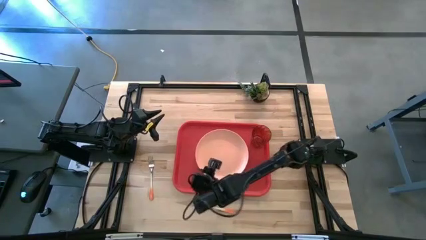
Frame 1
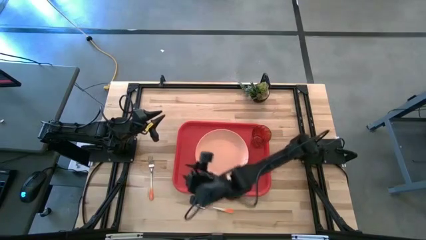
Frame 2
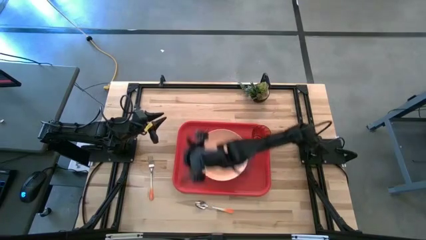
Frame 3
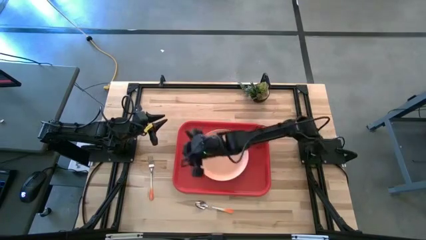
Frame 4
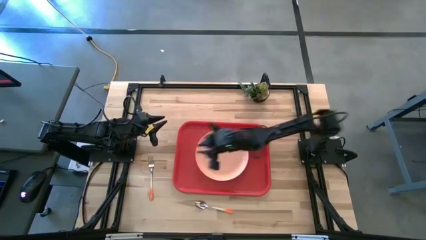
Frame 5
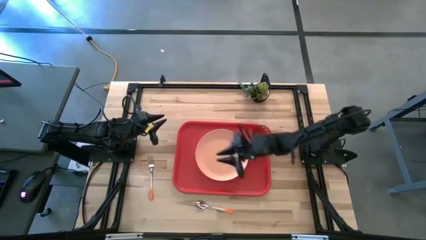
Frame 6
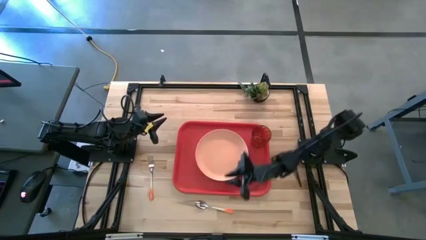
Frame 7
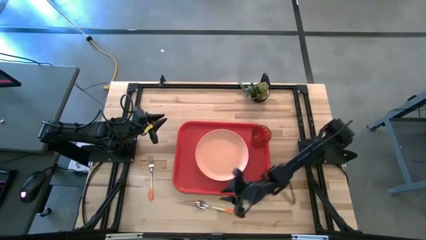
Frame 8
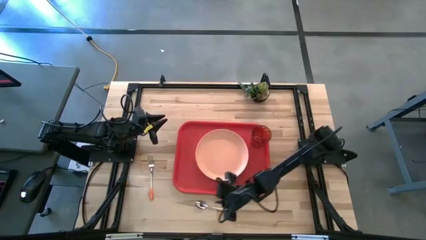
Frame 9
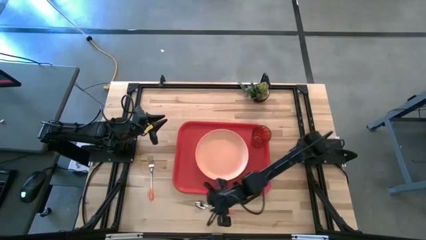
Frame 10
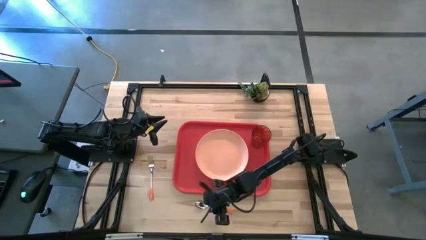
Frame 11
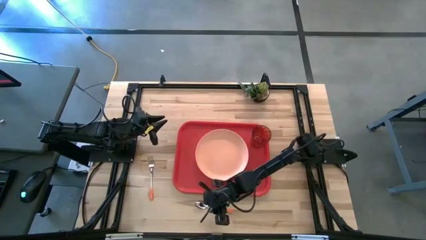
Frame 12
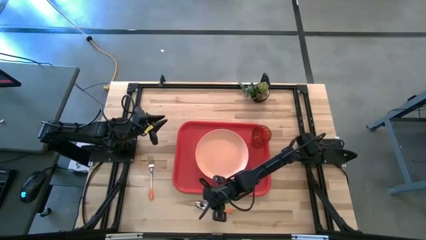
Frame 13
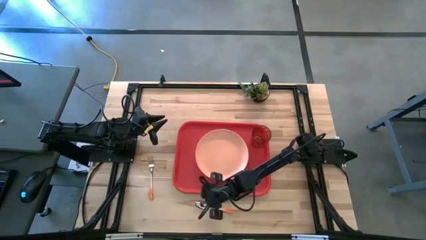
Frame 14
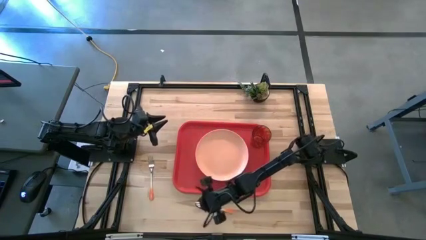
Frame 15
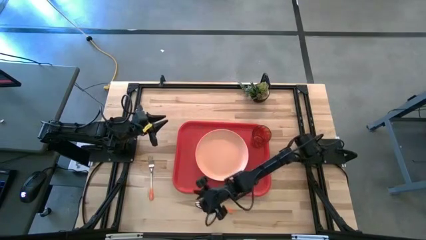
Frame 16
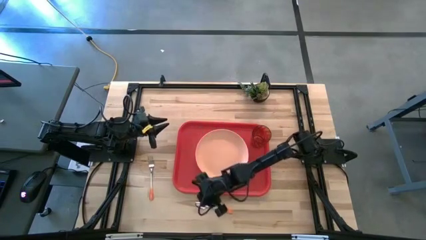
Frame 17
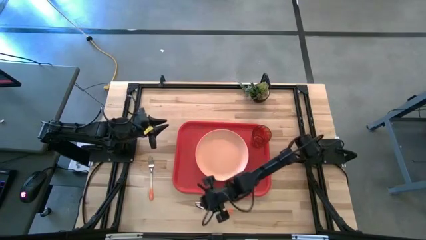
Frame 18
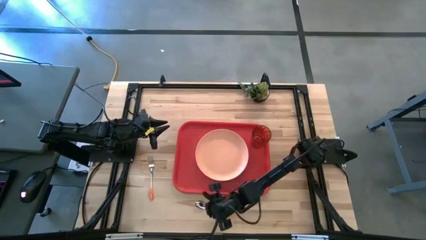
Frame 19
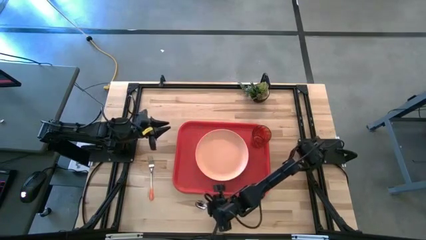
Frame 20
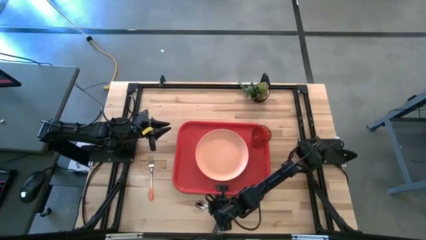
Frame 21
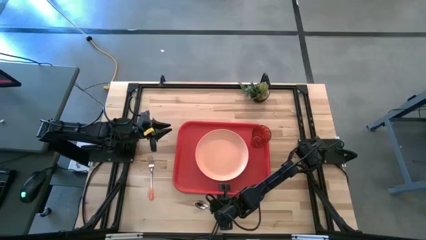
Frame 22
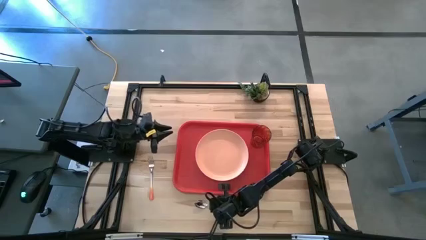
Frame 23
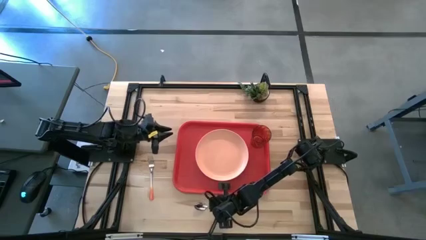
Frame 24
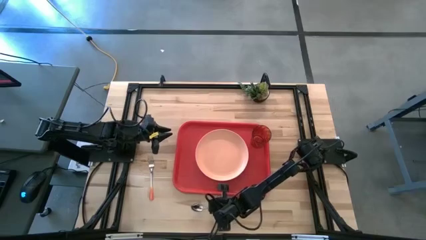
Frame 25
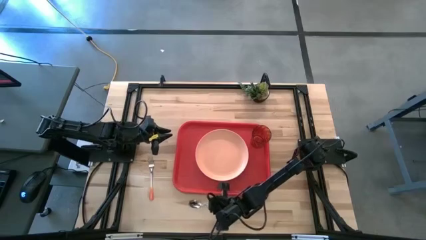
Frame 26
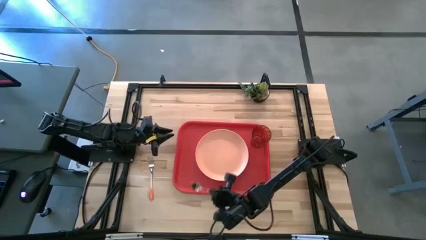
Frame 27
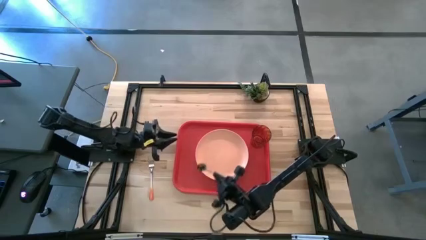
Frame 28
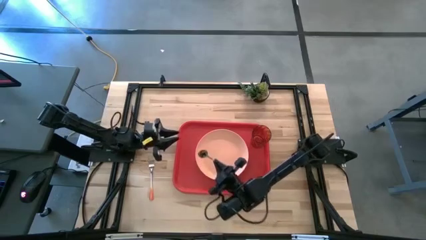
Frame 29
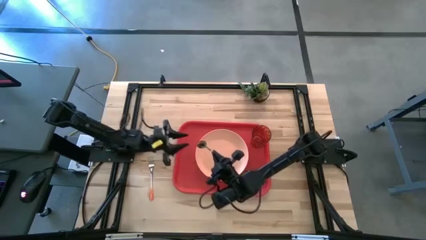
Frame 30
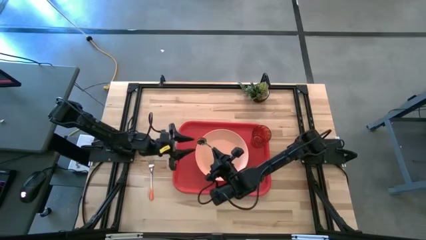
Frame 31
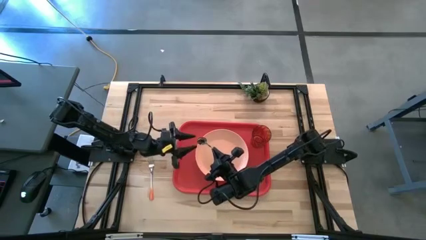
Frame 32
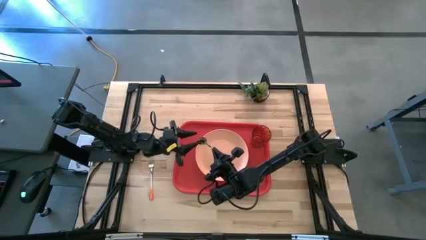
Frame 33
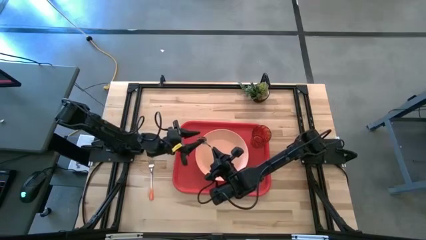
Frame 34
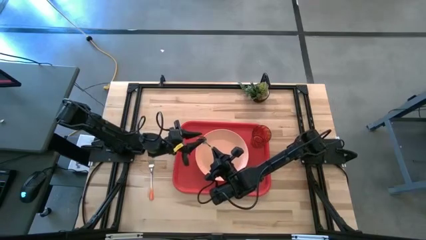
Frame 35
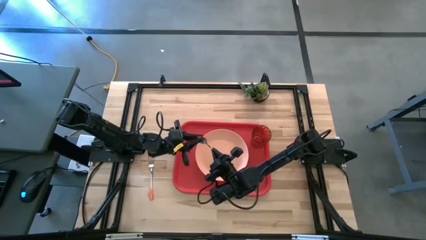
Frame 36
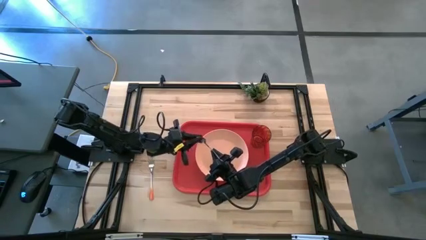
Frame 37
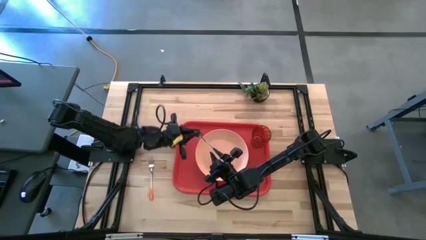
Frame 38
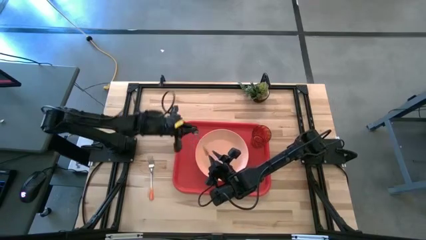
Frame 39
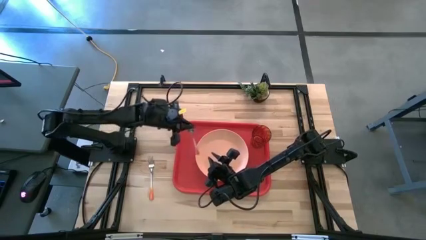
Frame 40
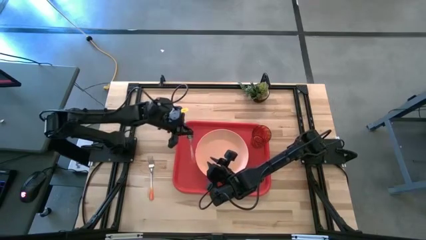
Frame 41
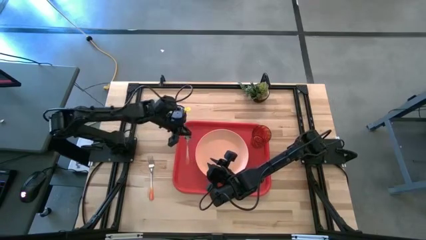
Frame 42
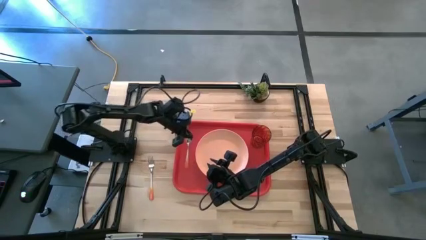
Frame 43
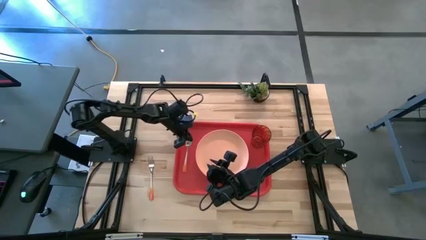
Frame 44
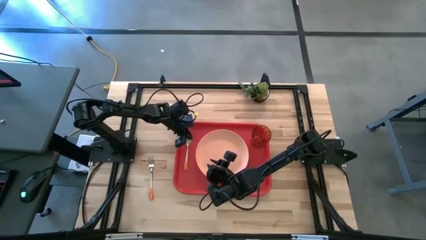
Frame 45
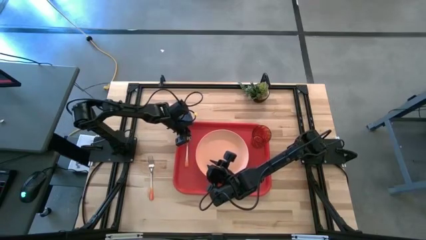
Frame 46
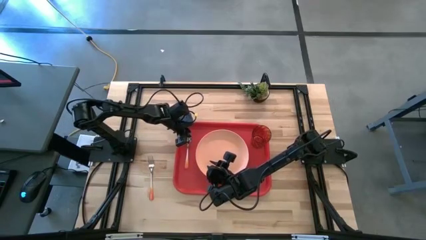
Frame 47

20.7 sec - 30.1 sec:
Task: Pick and place plate/cup/fork/spoon on tray
Put the orange spoon on the red serving tray at the left of the orange plate

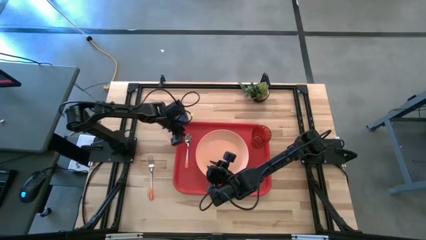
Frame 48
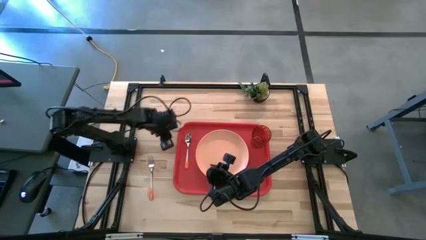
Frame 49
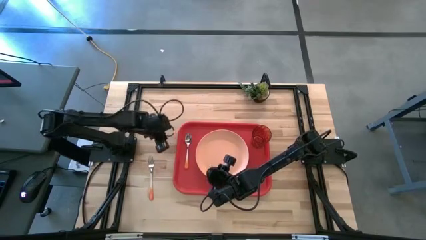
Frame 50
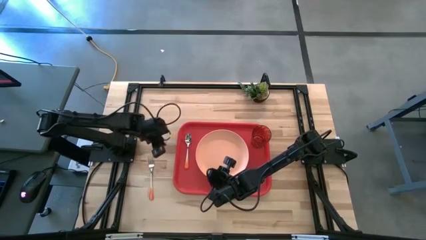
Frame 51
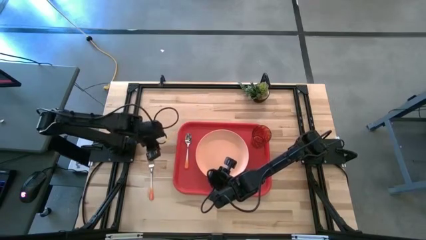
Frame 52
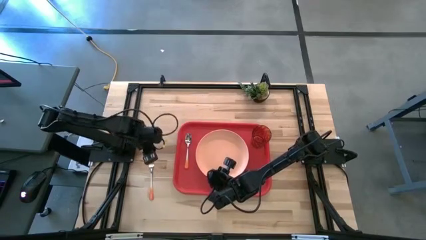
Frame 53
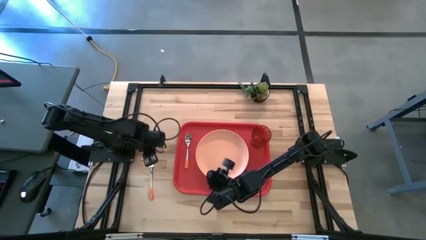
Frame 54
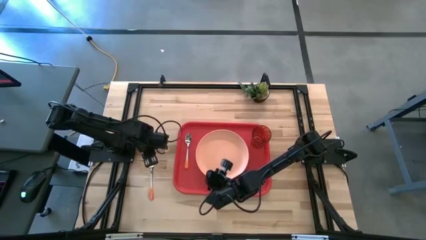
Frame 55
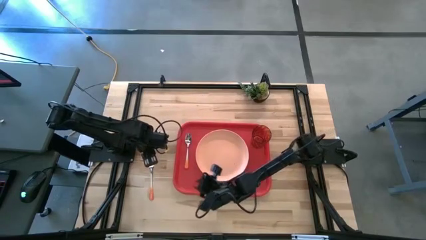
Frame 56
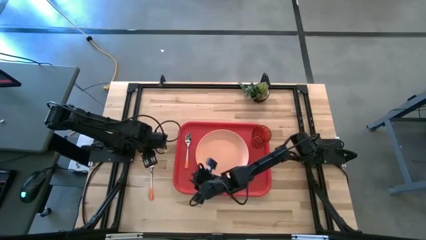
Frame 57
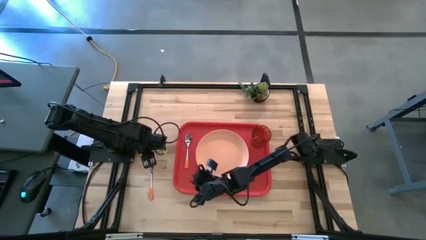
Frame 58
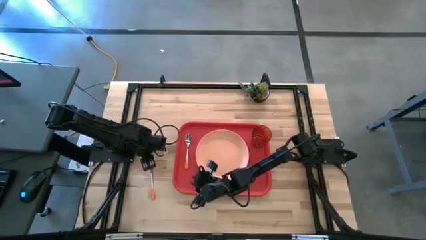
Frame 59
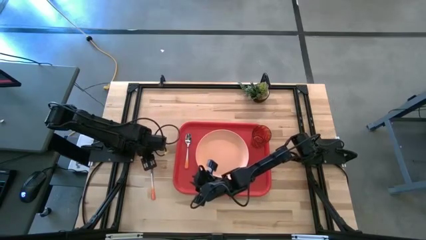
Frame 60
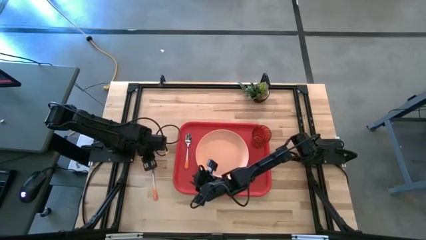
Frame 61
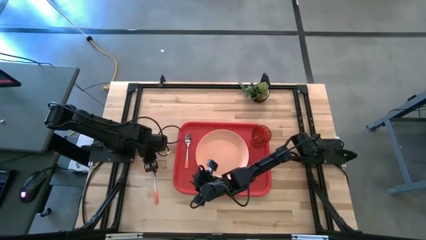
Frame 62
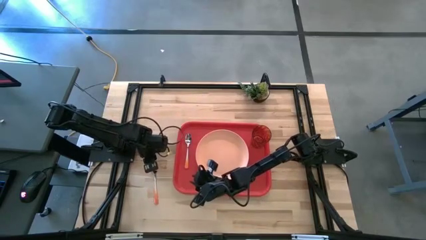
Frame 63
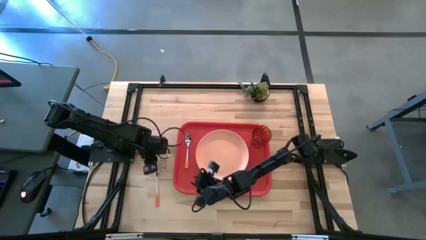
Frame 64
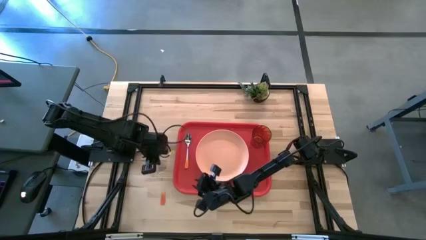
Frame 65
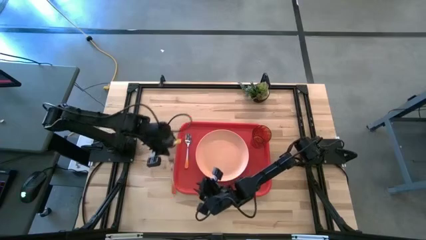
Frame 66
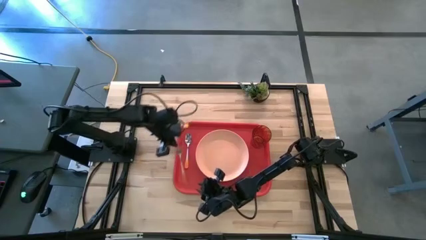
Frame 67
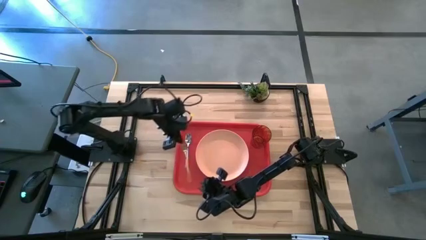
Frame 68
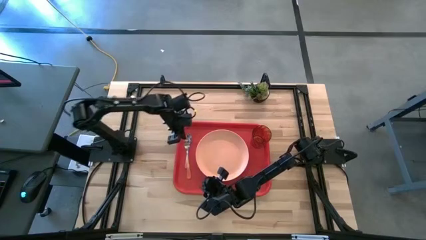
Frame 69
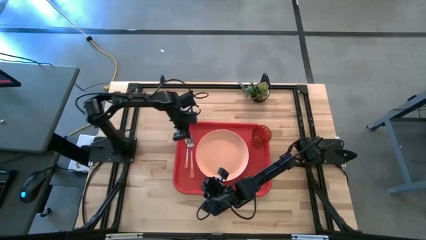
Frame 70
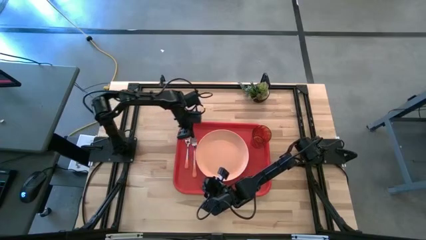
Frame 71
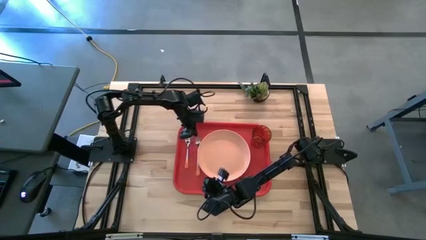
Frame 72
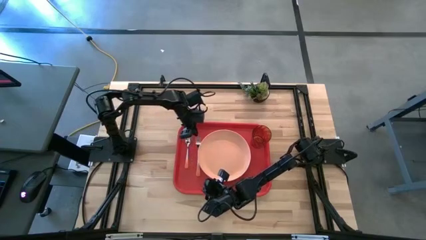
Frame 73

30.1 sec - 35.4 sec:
Put the orange fork on the red serving tray at the left of the orange plate

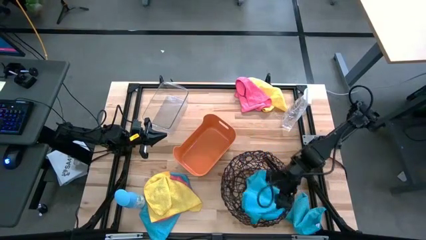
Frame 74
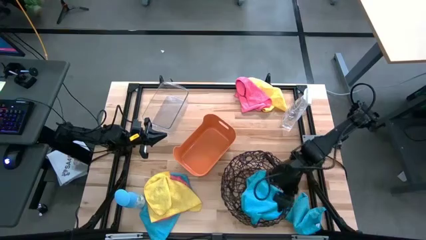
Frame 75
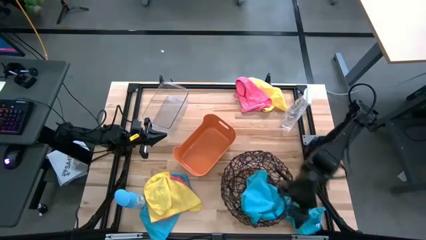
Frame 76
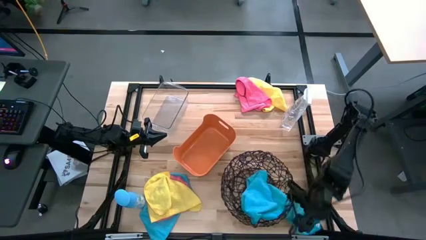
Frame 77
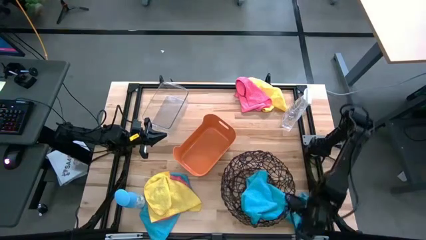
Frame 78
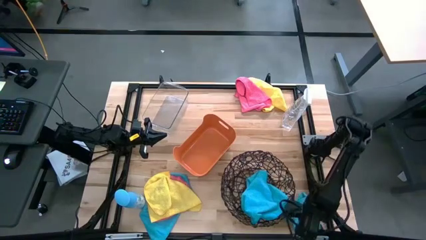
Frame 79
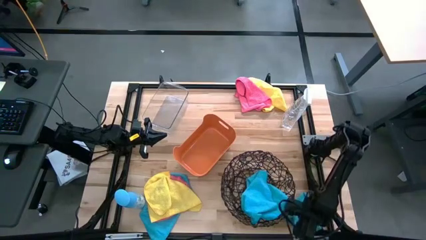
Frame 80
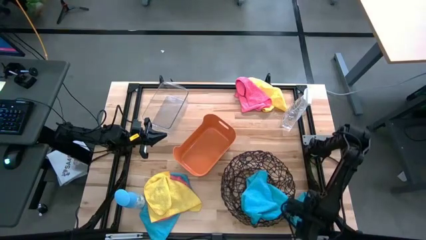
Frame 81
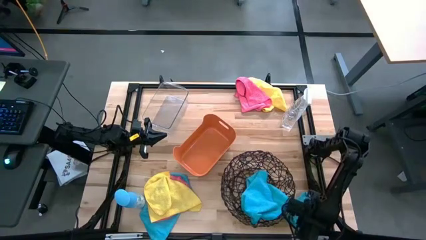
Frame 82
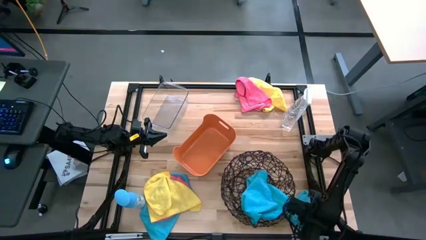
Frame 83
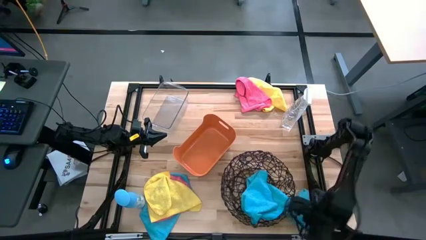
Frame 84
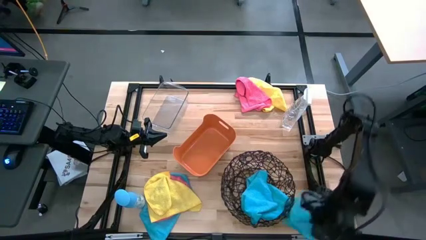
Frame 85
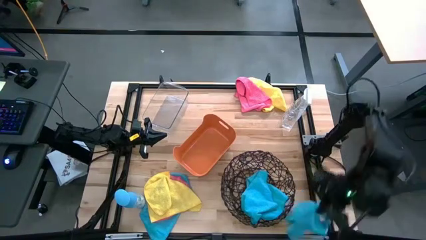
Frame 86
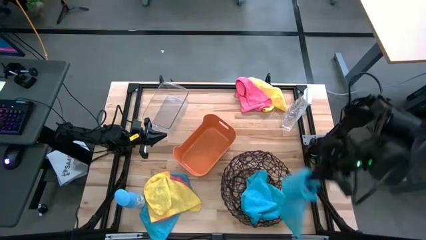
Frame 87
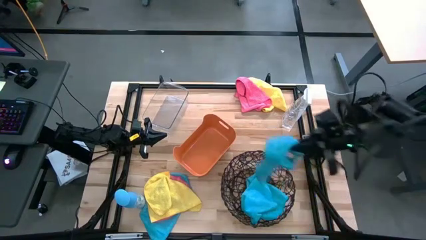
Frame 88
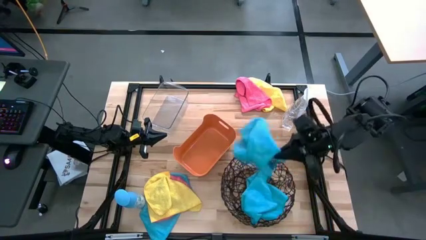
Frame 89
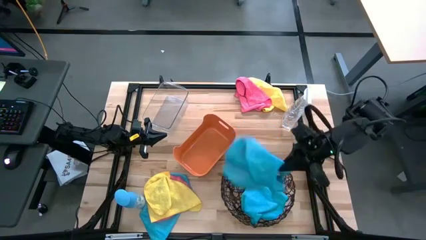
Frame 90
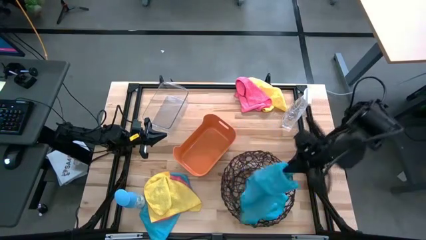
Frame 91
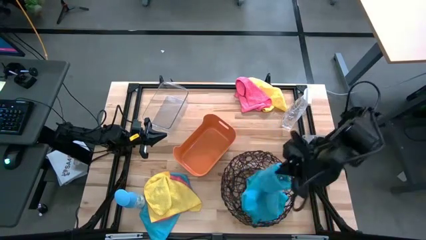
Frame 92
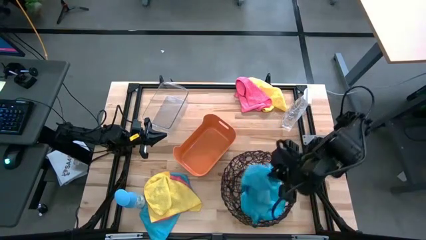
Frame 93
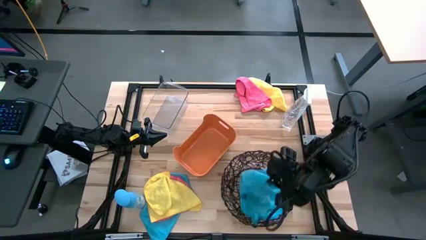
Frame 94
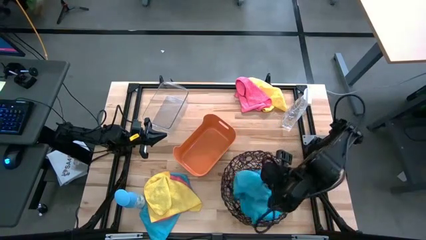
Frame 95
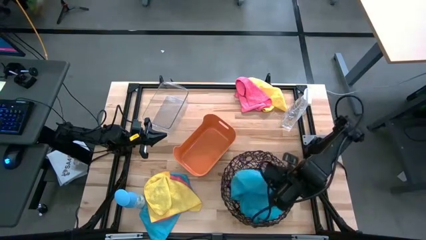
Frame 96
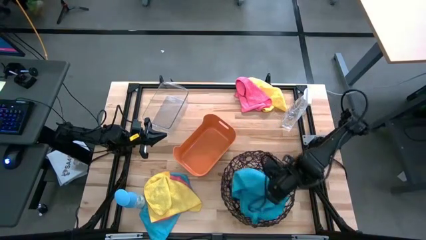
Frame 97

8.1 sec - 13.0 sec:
Task: Sort microfiber towel by color & place in baskets
Put the right blue towel into the black wire basket
